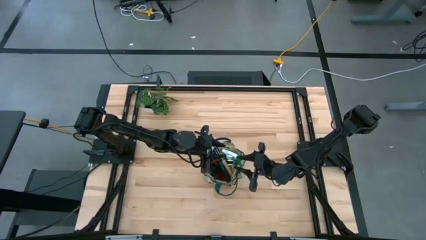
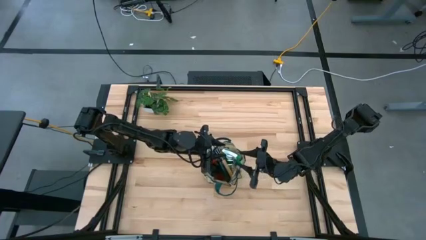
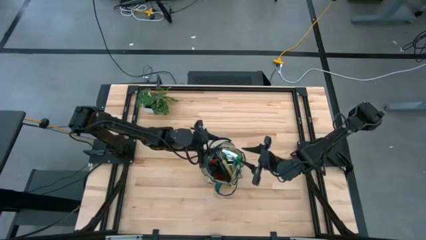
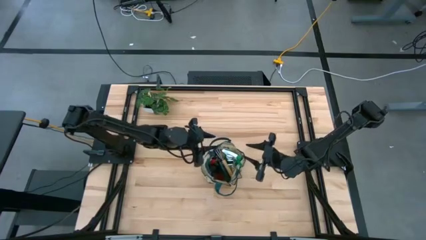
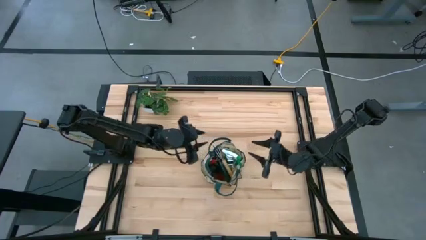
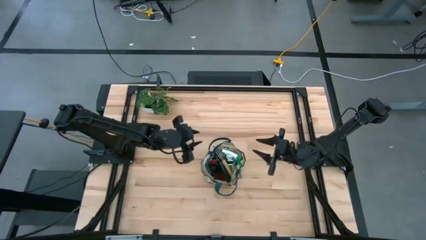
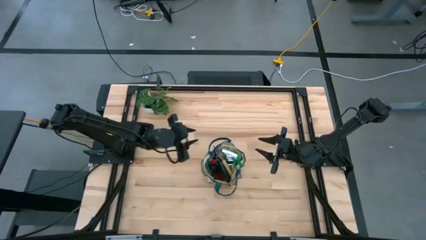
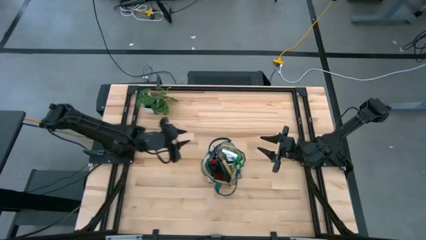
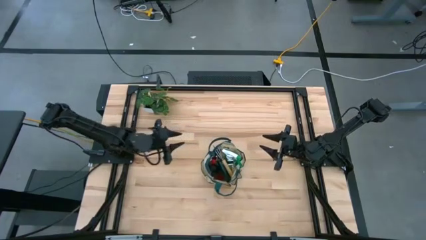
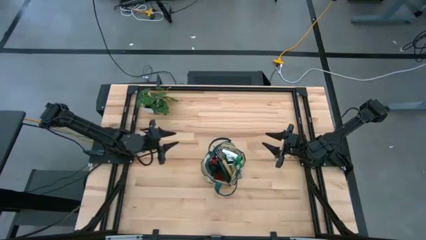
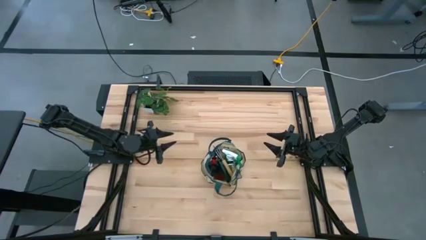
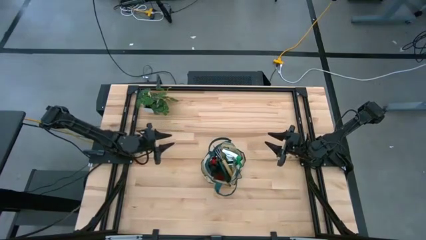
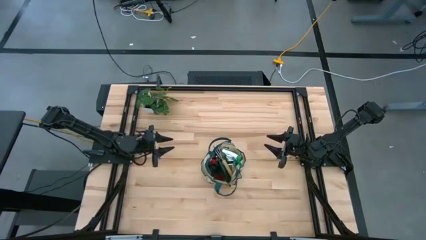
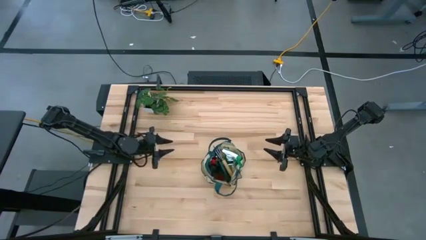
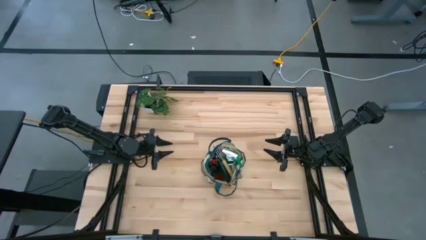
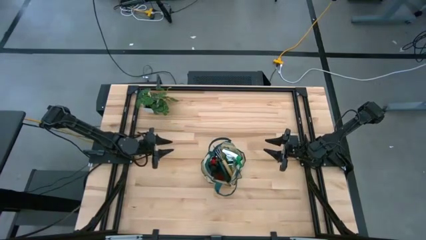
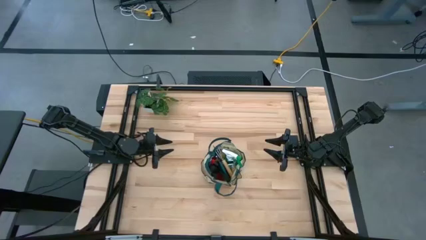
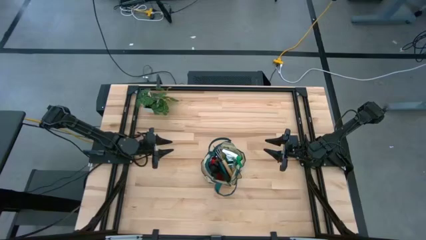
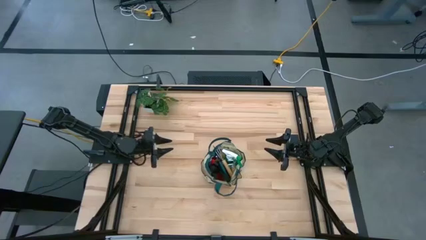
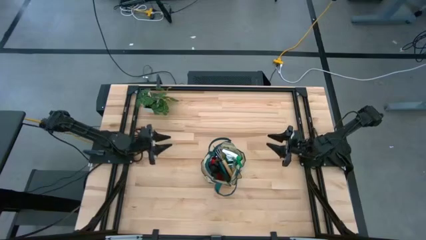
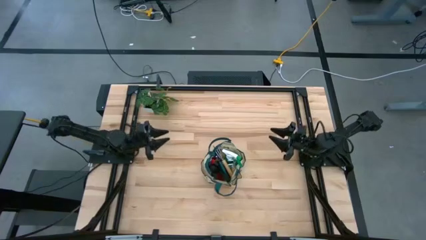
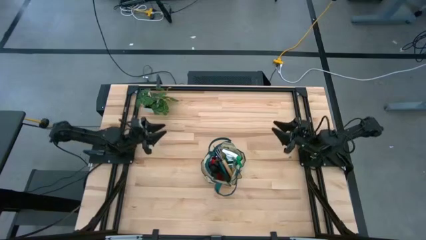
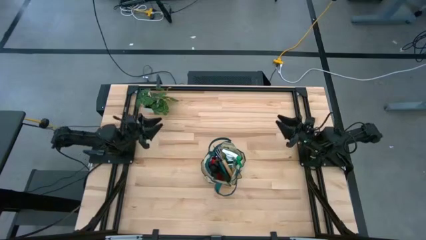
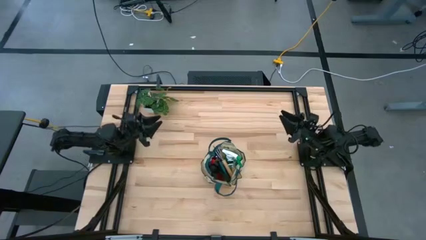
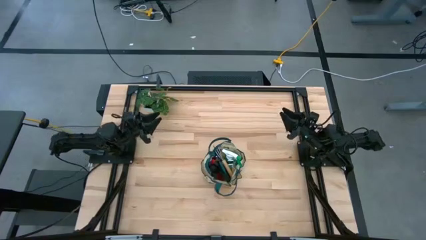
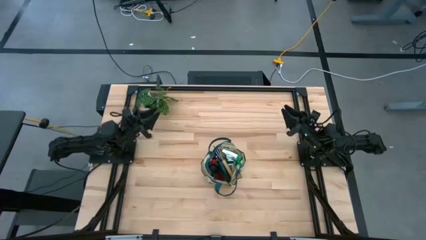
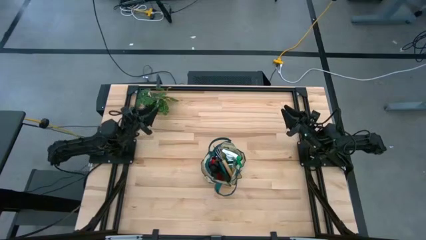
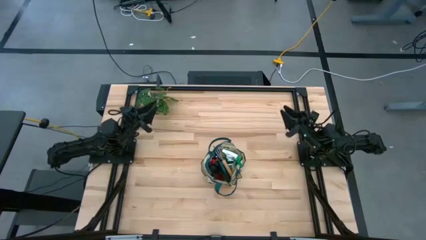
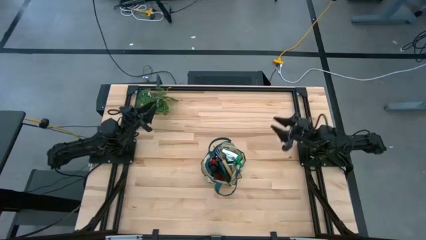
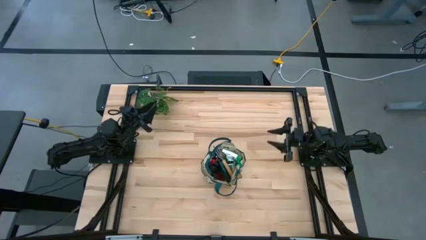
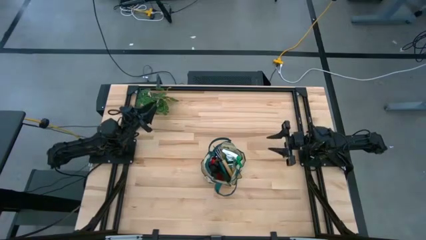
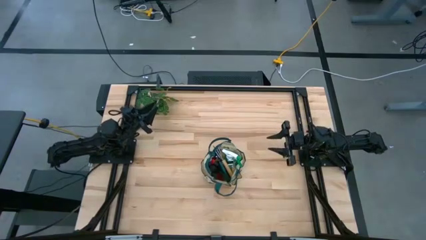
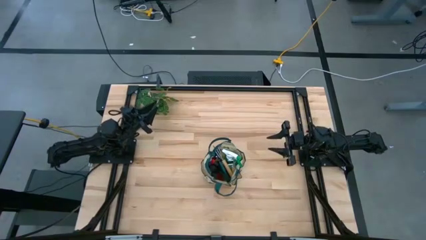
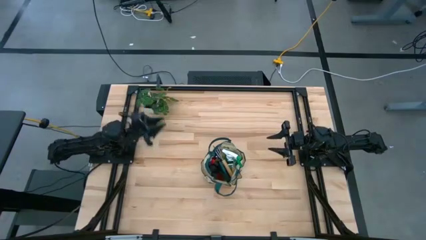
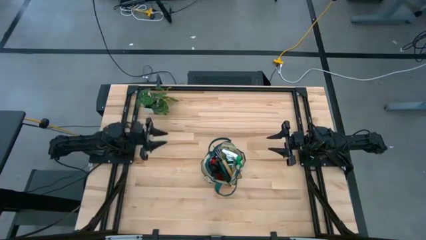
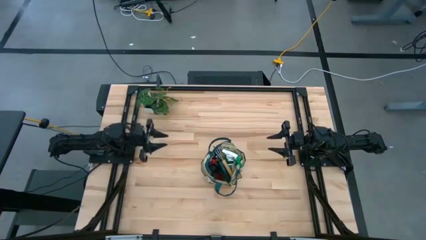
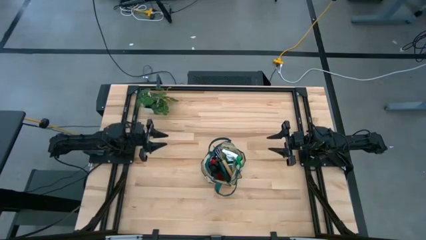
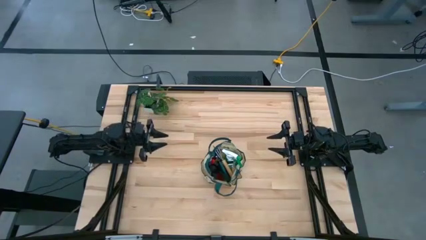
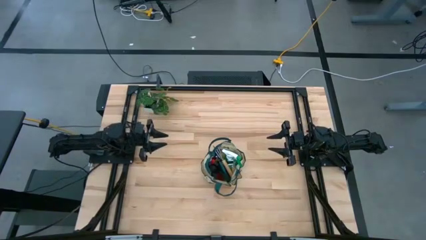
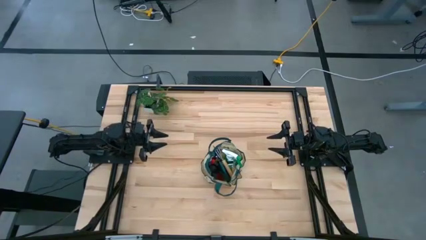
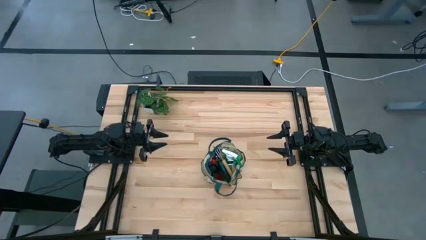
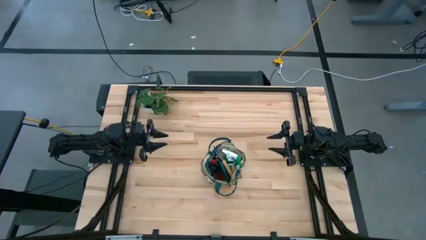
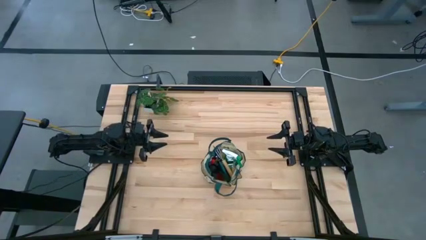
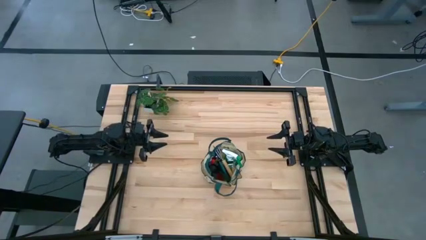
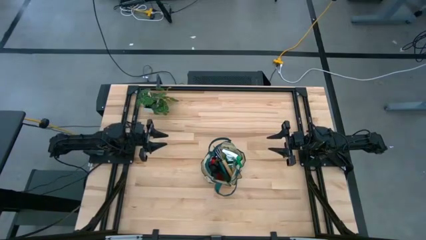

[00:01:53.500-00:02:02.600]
Task: Pick & Place Garden tools in Gardening bag
Return to Home Position

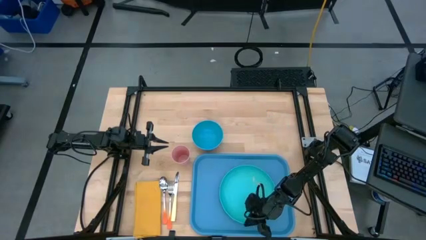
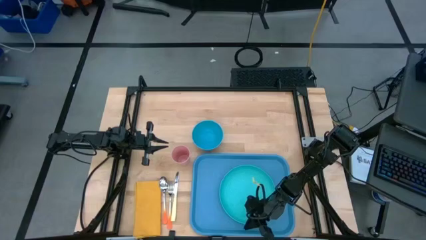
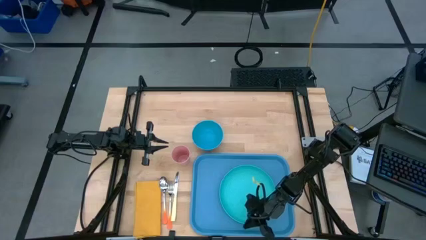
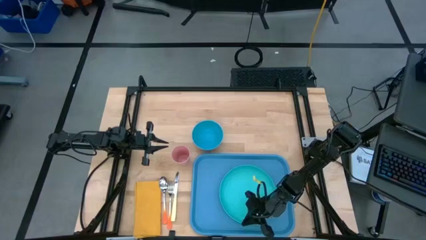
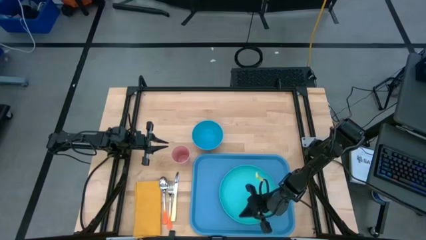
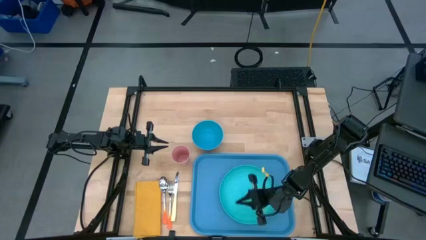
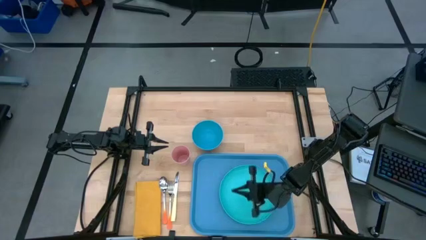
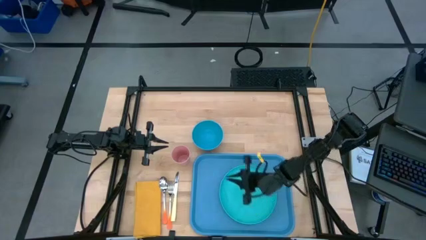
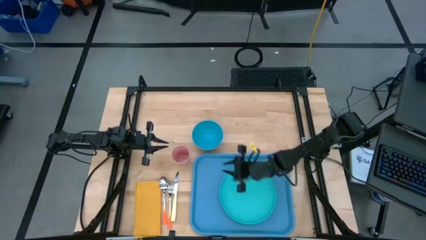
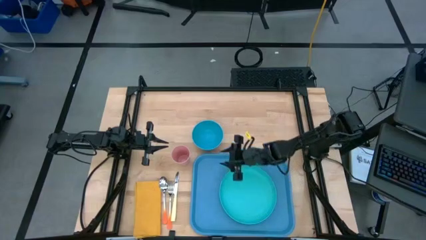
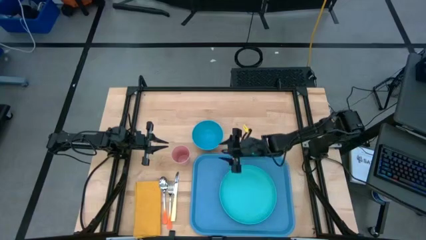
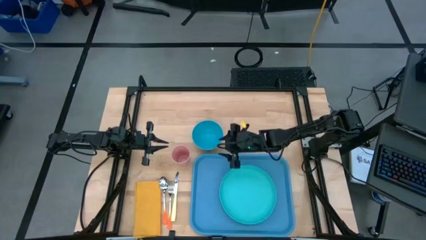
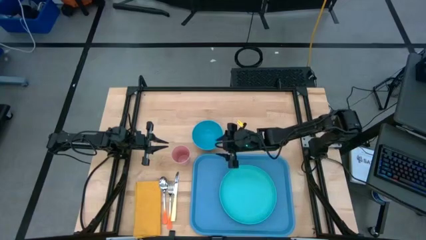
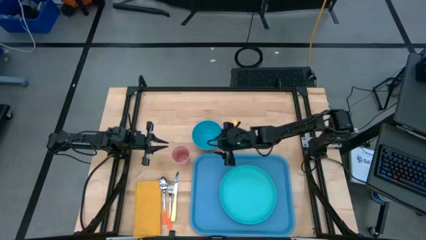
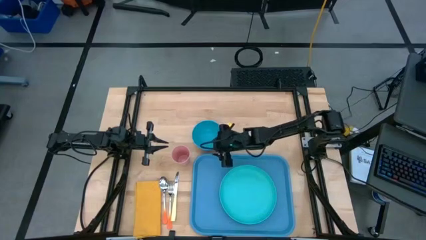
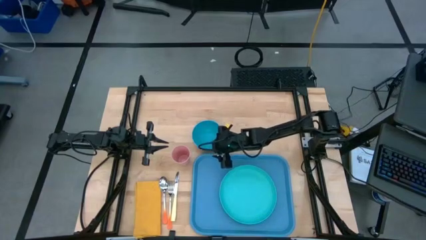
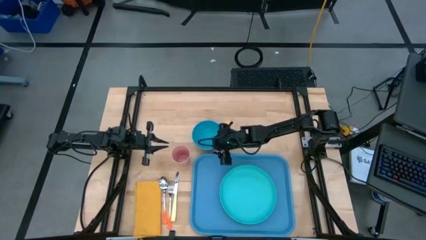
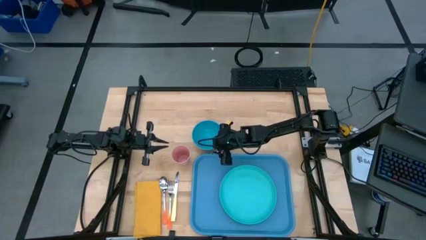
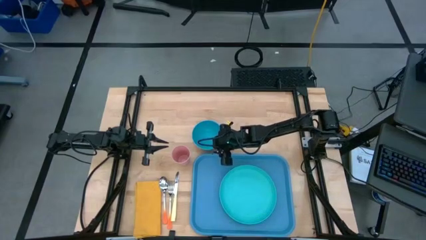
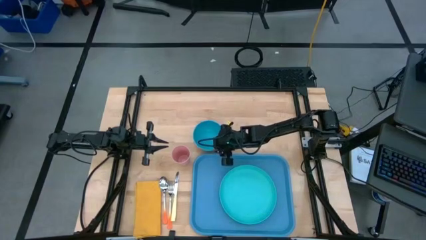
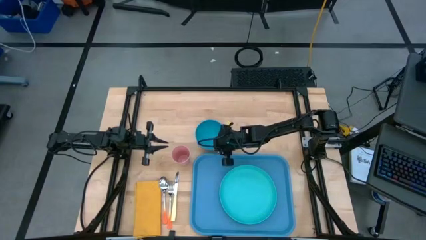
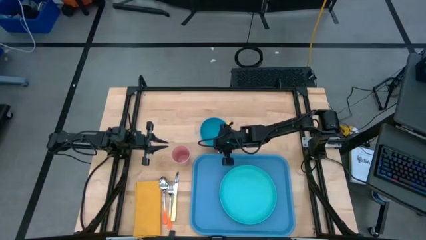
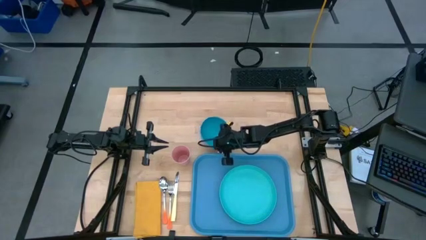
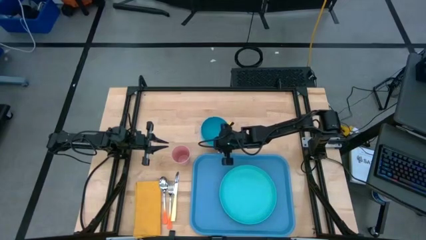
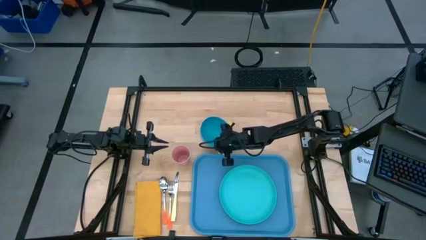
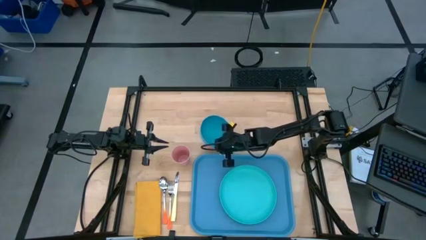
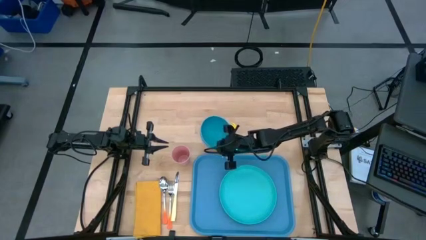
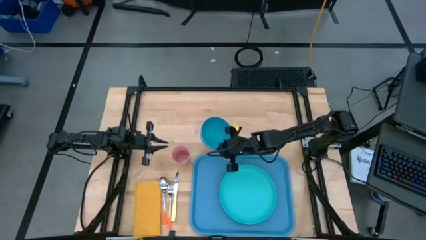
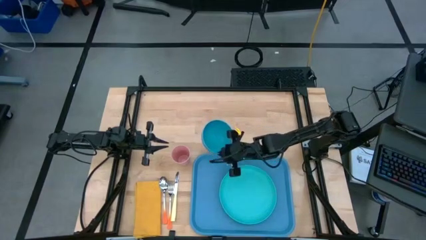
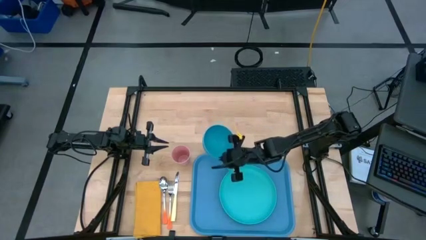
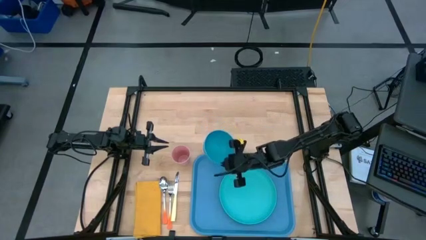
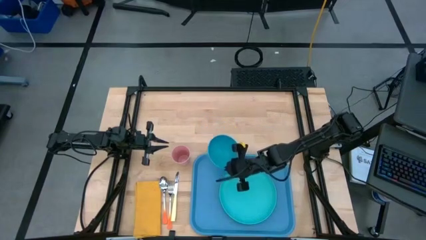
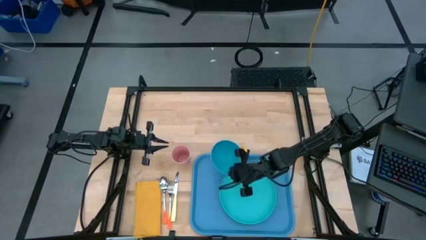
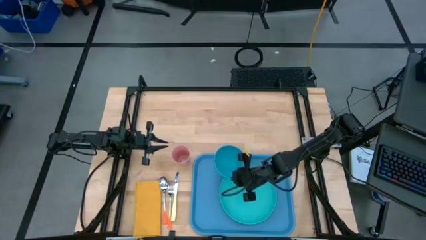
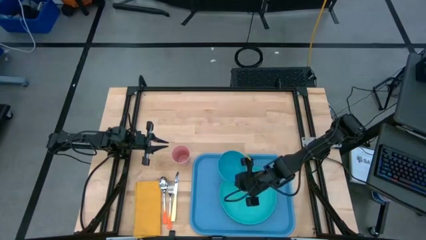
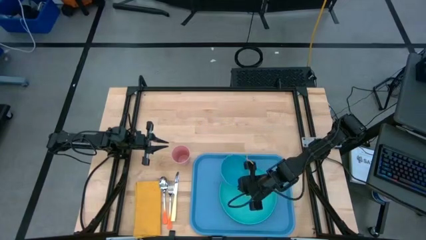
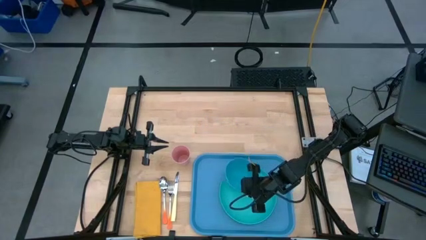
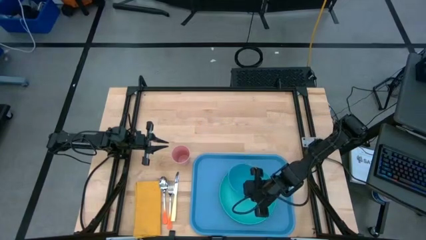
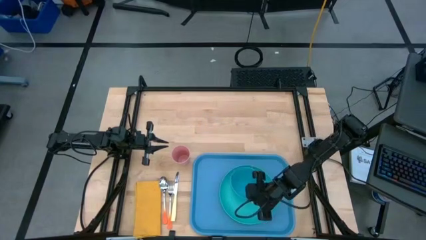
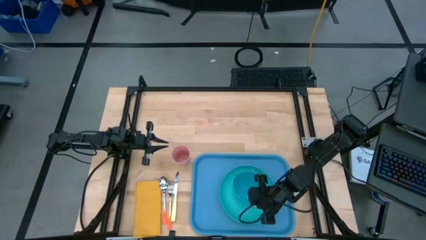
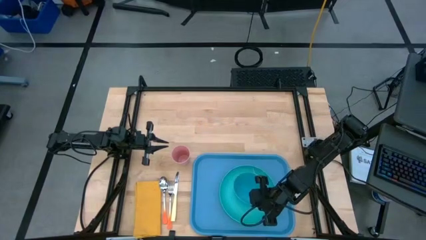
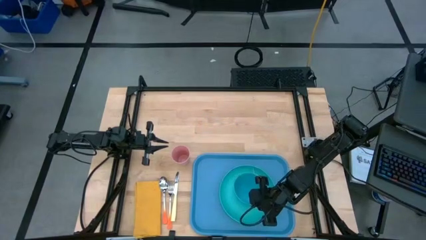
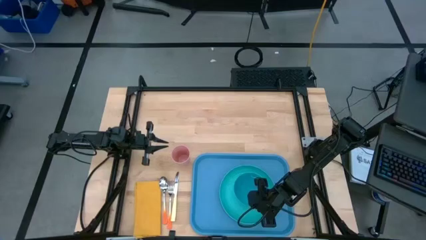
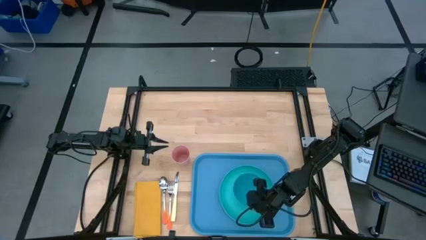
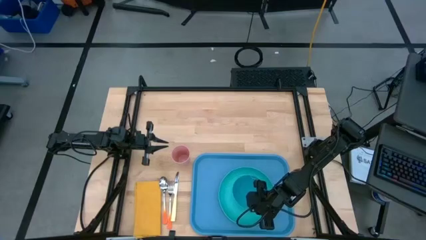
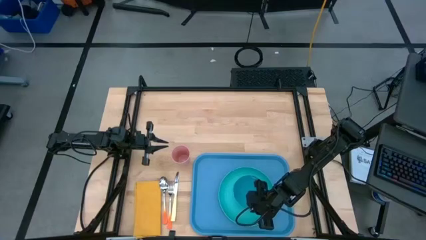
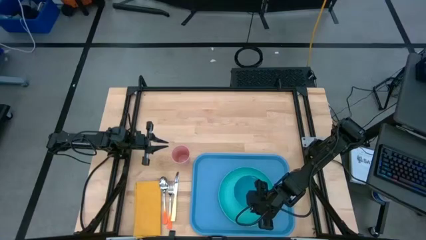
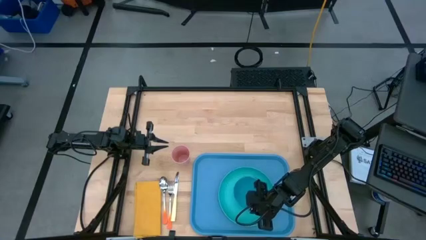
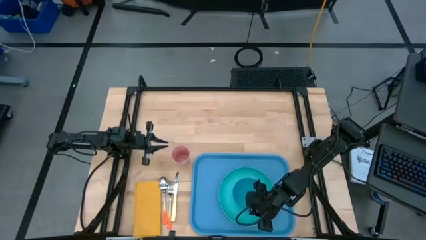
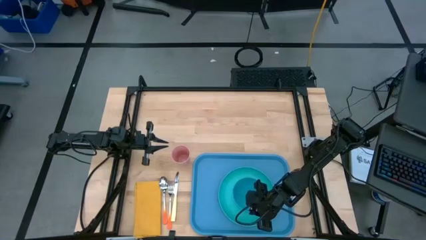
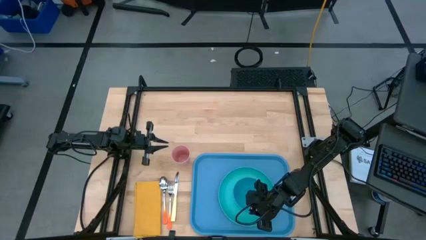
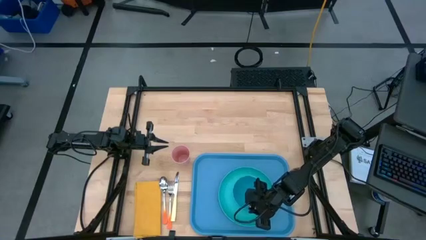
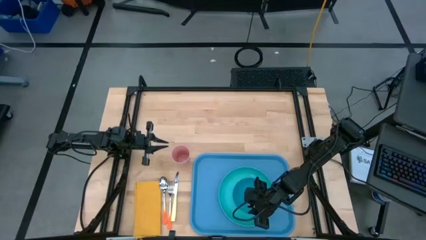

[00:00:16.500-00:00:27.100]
Task: Set up tray
Put the blue bowl on the light blue plate
